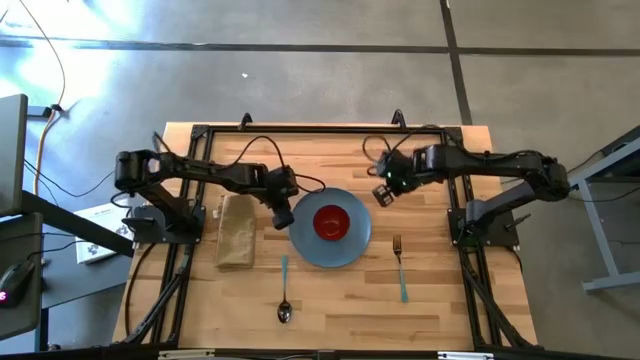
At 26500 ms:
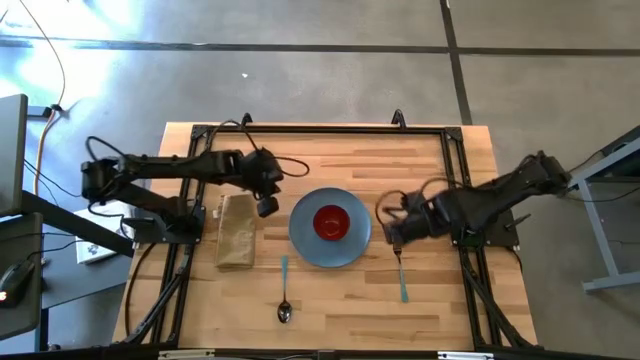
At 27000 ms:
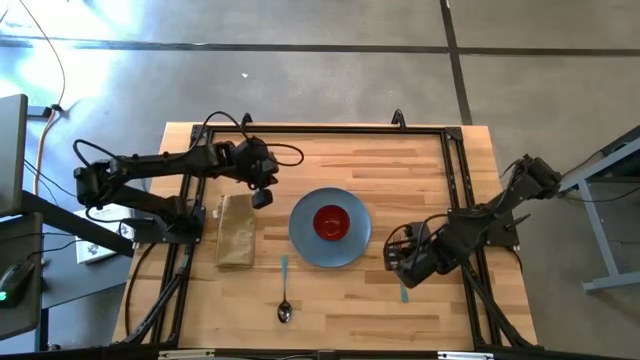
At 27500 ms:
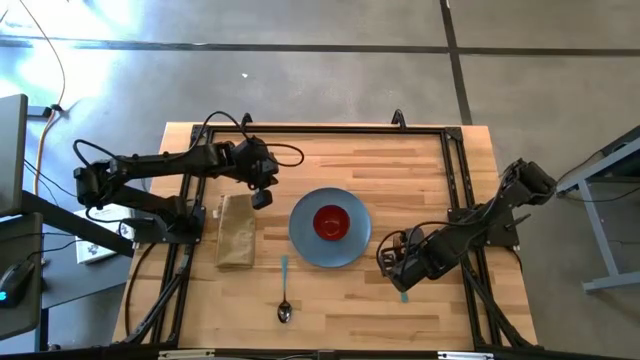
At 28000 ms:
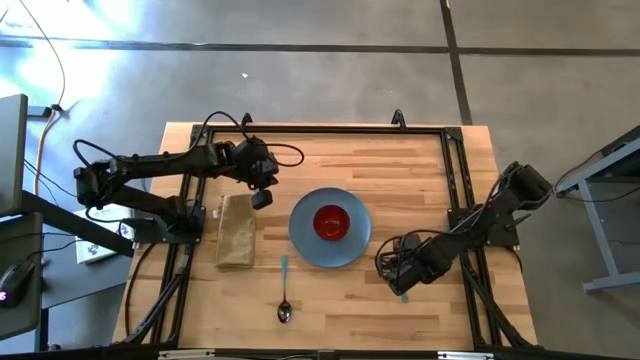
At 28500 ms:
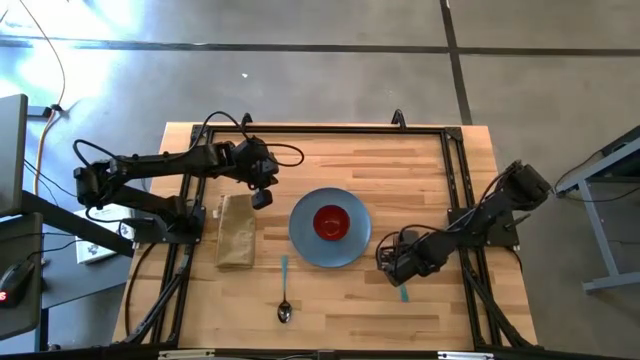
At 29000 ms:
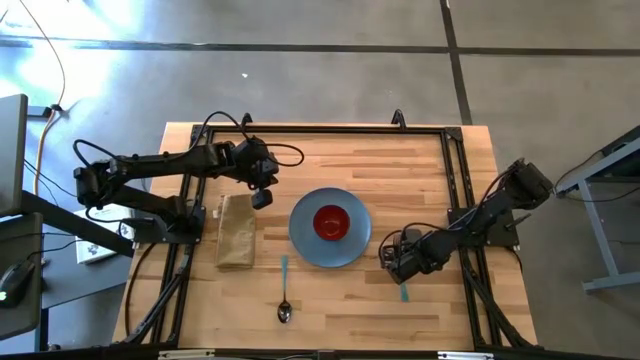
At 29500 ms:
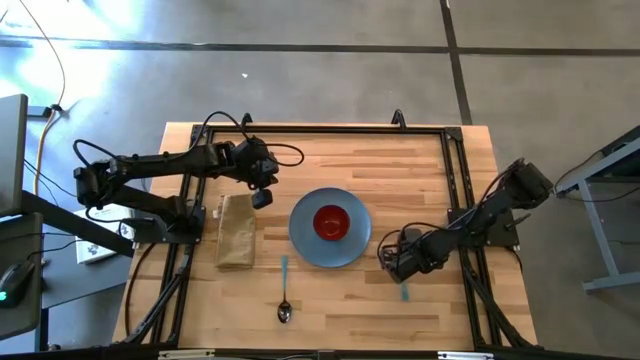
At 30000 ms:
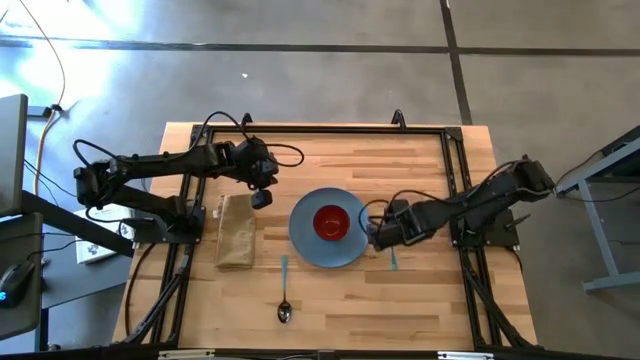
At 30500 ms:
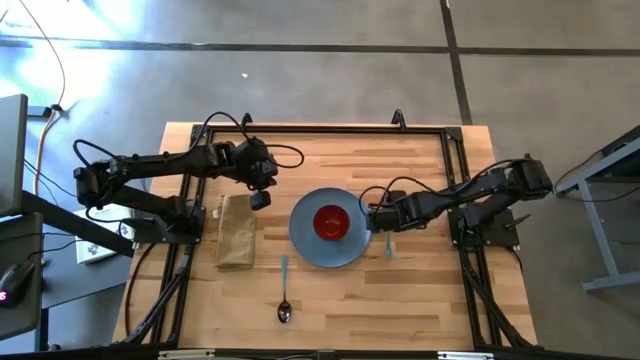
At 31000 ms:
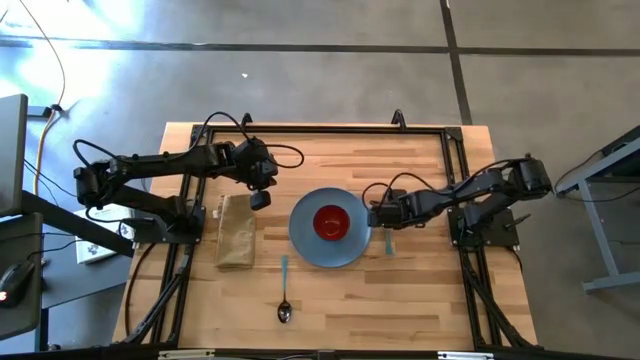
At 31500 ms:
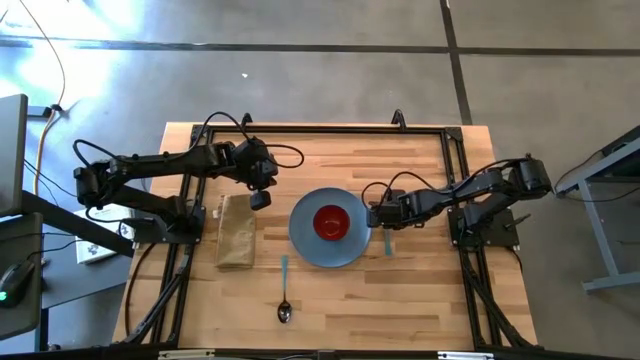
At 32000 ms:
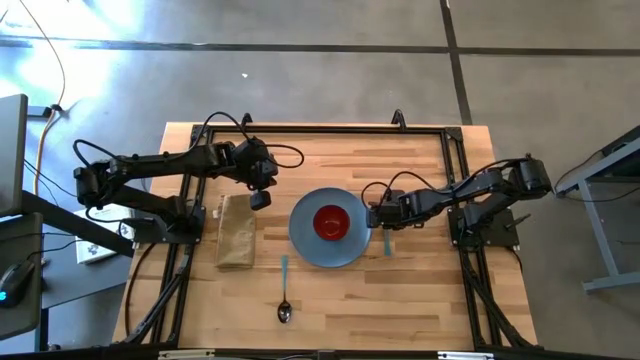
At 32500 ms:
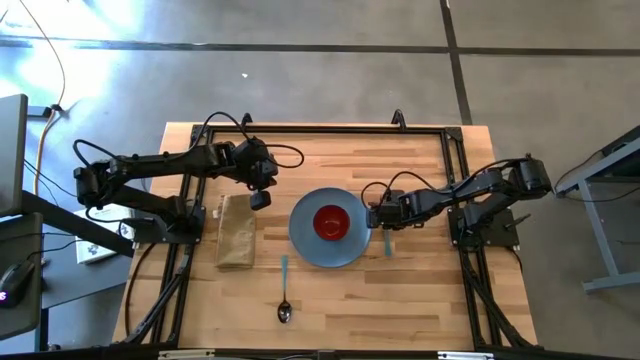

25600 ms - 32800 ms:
Task: Set table place
Put the blue fork to the right of the blue plate

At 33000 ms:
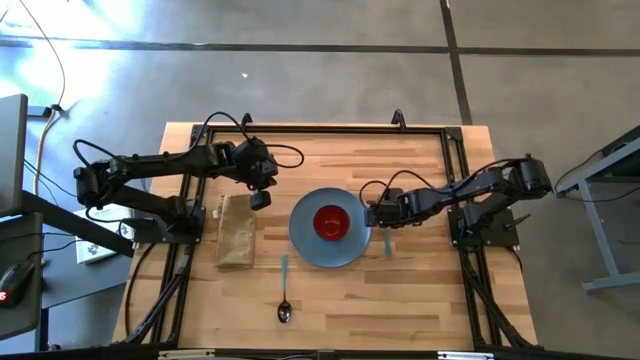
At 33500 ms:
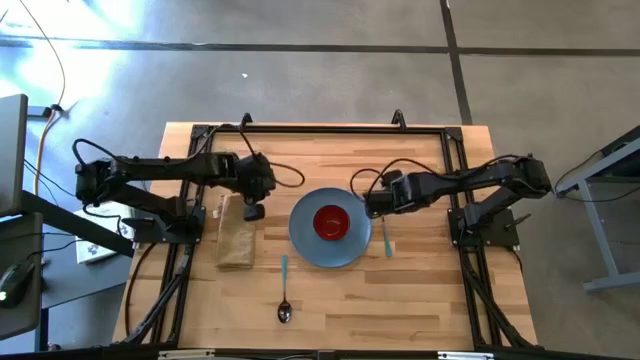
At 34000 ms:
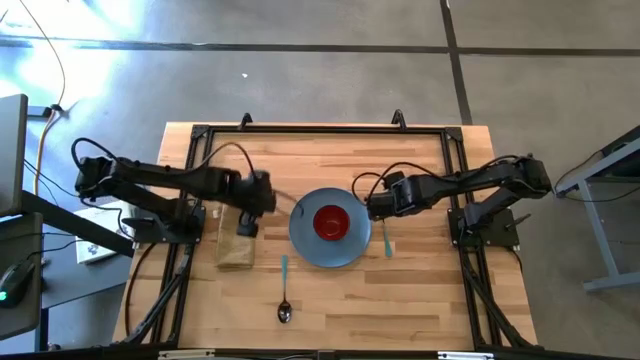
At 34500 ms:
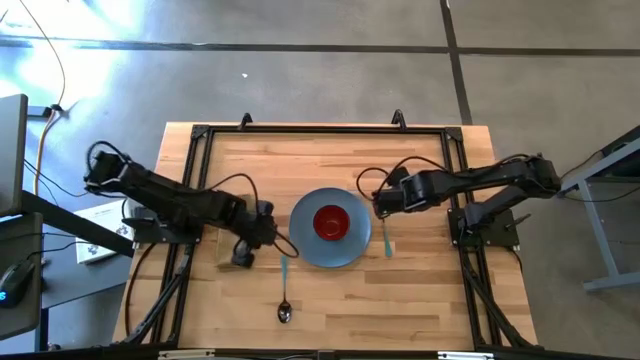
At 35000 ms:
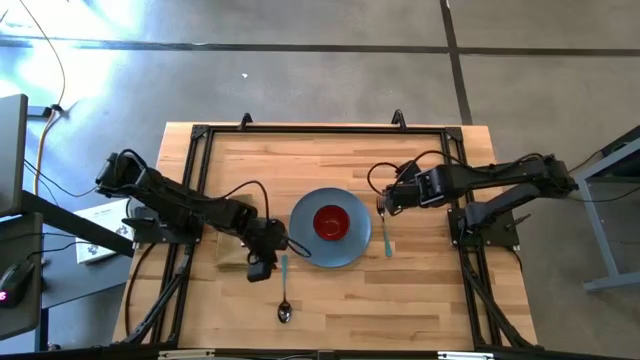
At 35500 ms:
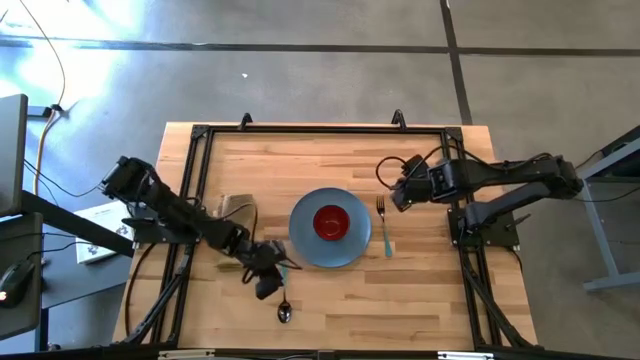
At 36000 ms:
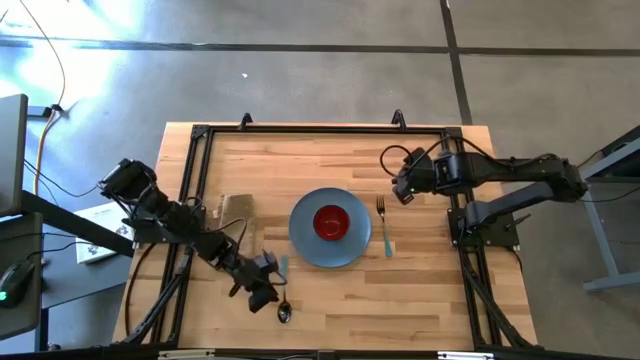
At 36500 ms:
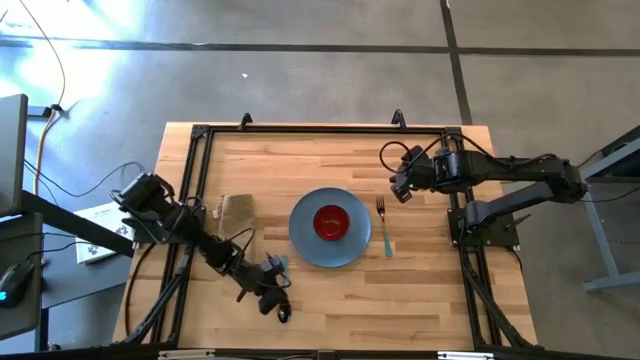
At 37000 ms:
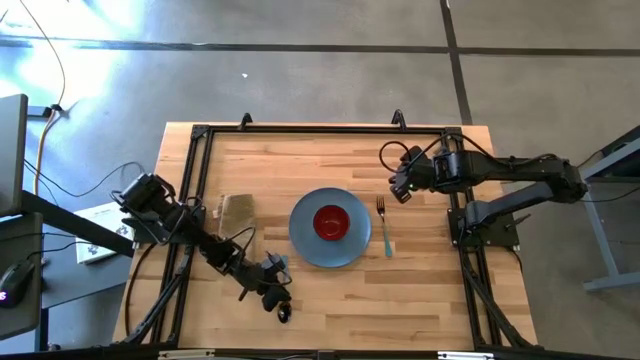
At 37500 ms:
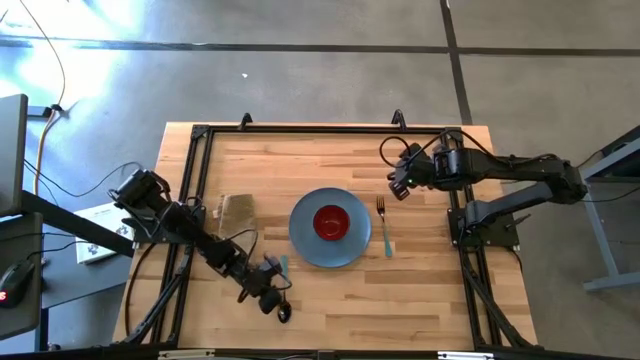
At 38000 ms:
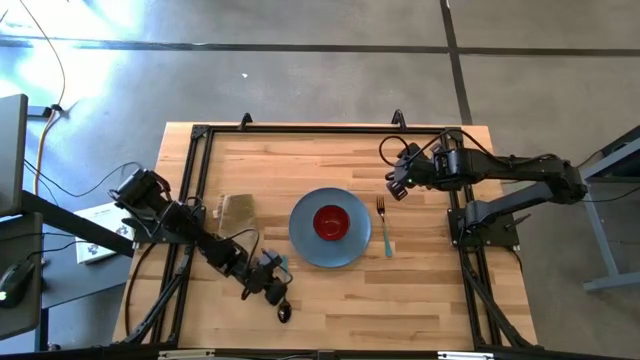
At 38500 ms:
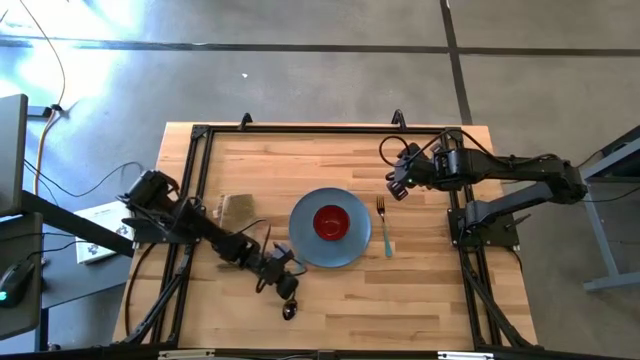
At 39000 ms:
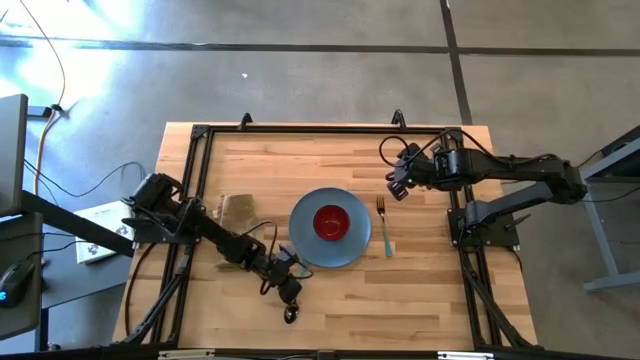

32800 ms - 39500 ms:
Put the blue spoon into the black bowl

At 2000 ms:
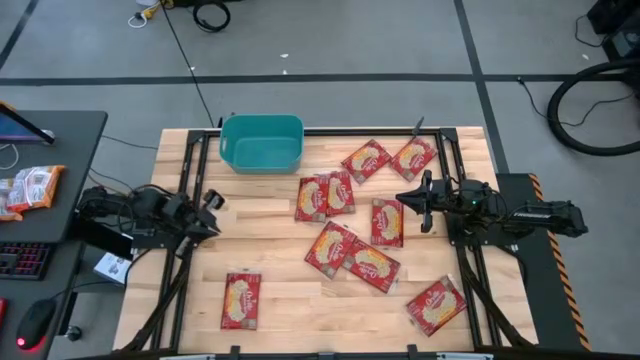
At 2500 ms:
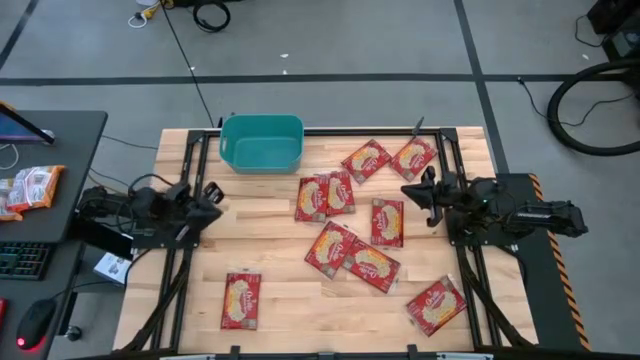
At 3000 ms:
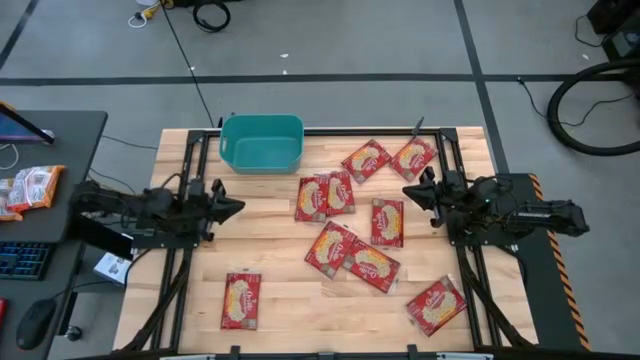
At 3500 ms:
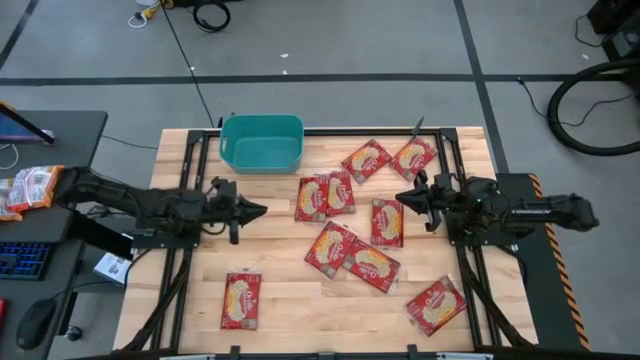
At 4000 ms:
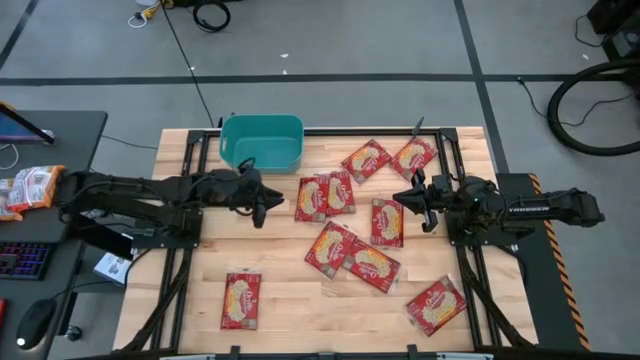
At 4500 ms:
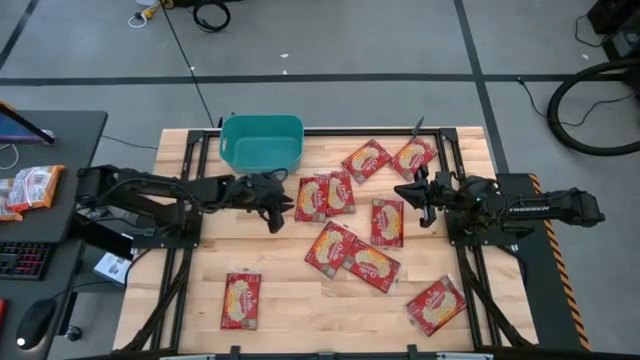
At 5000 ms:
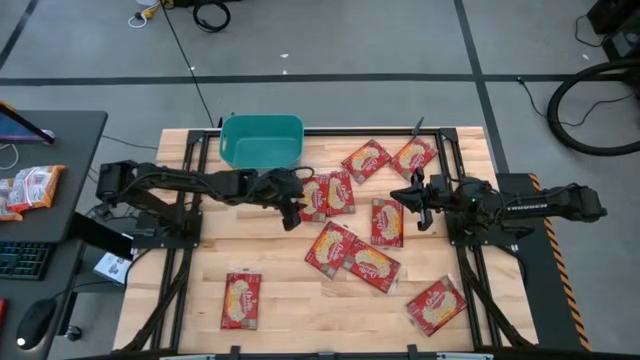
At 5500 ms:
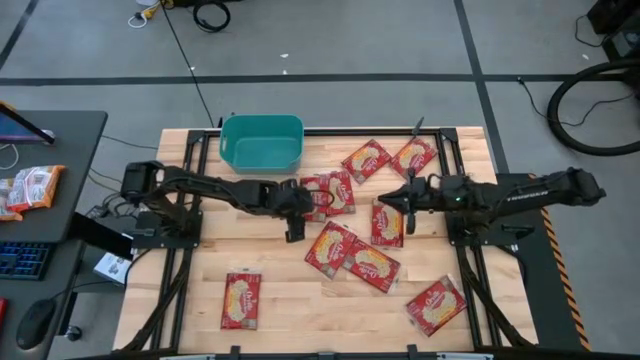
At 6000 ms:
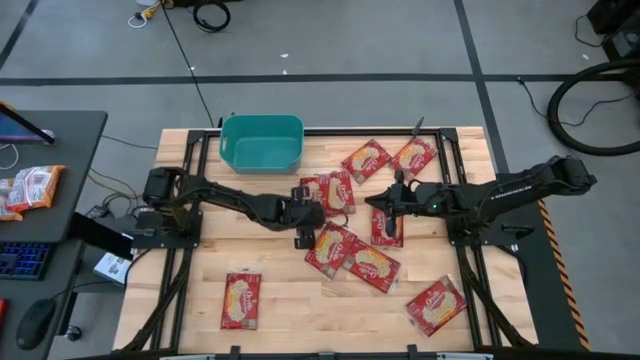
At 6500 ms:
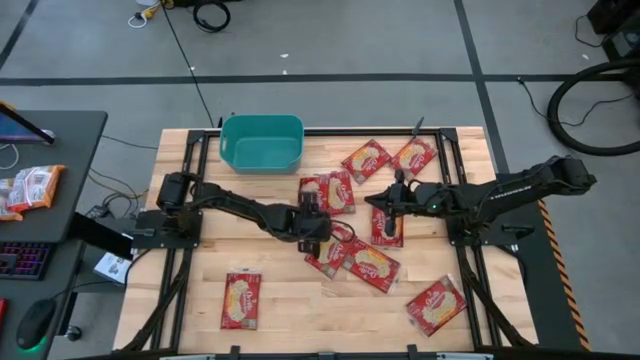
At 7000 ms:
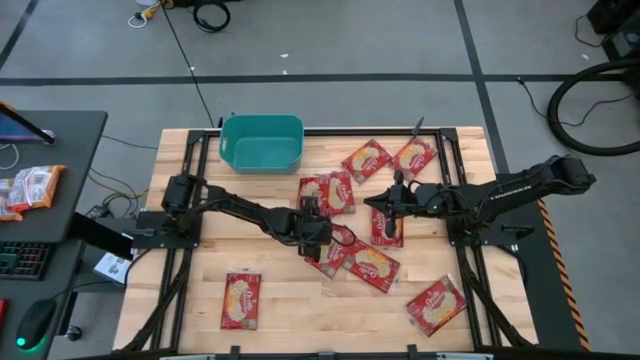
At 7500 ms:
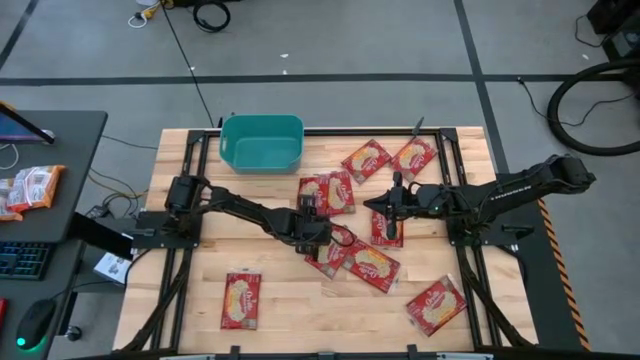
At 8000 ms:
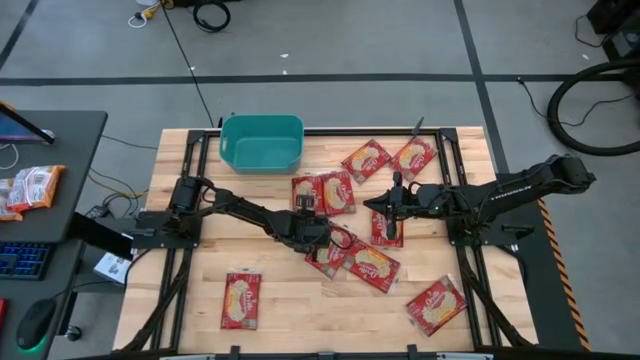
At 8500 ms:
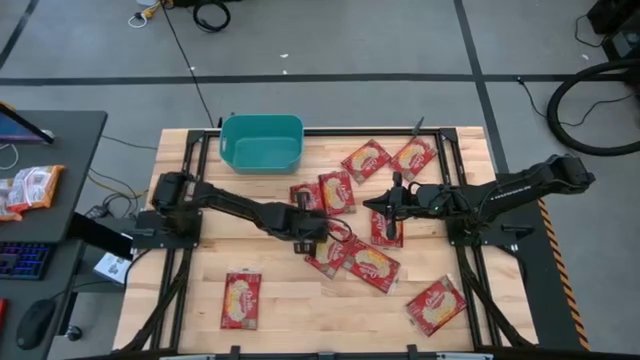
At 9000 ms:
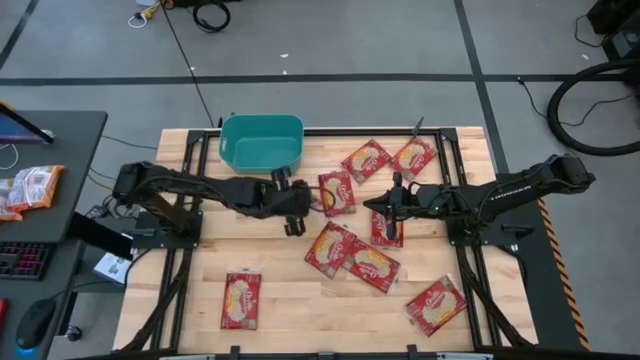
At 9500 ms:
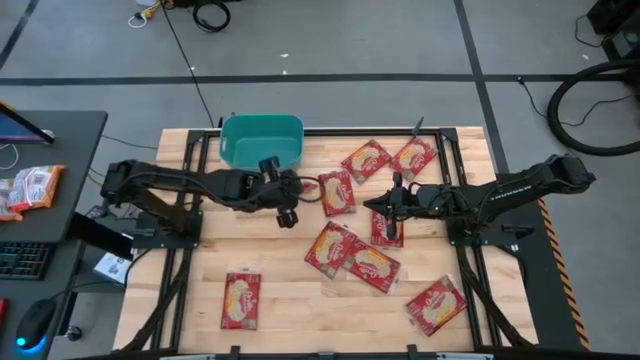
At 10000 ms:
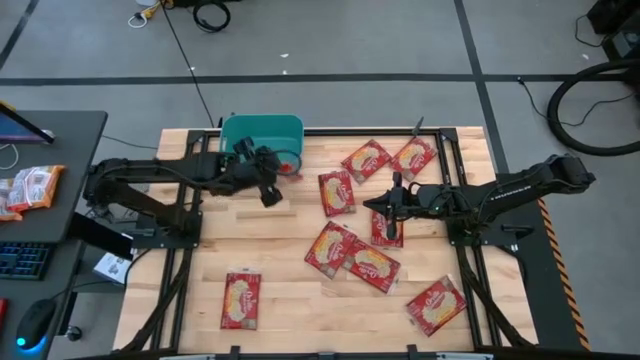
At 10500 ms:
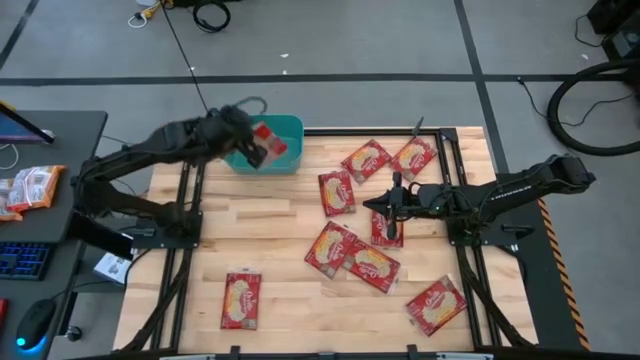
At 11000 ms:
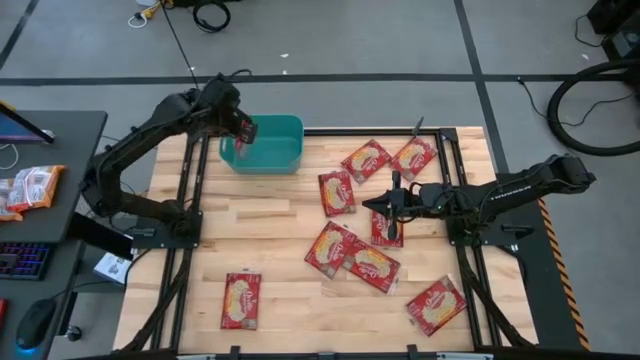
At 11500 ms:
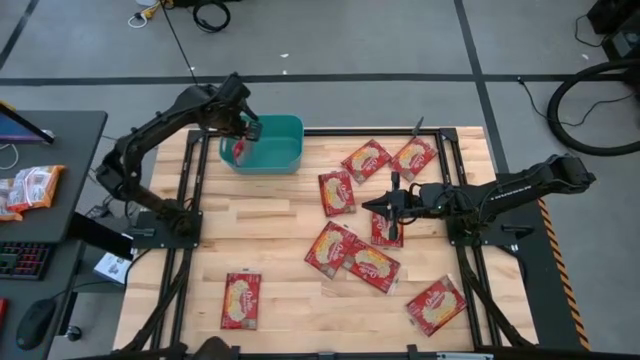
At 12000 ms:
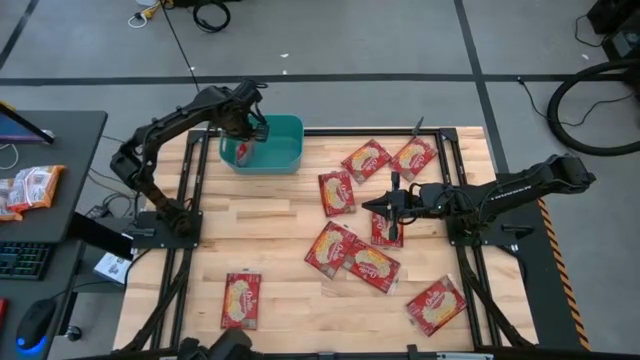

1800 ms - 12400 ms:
Task: Sort popcorn bags into baskets
Put the popcorn bag into the blue bin
